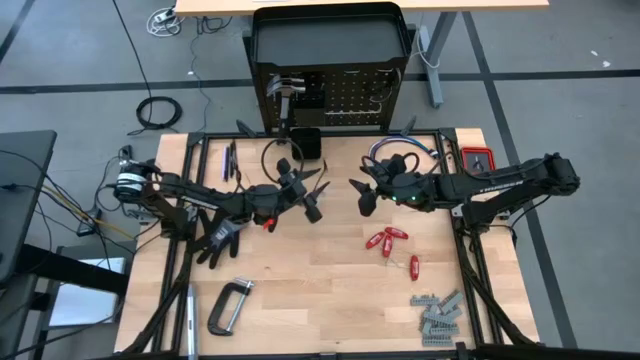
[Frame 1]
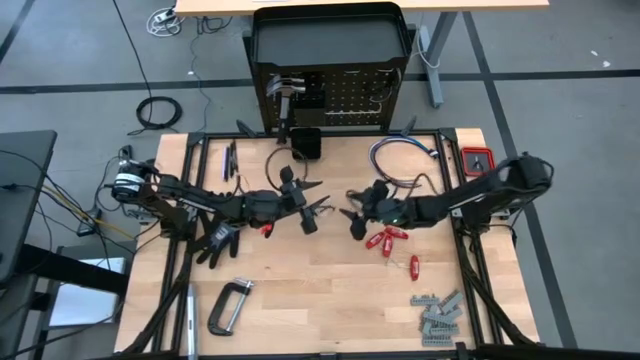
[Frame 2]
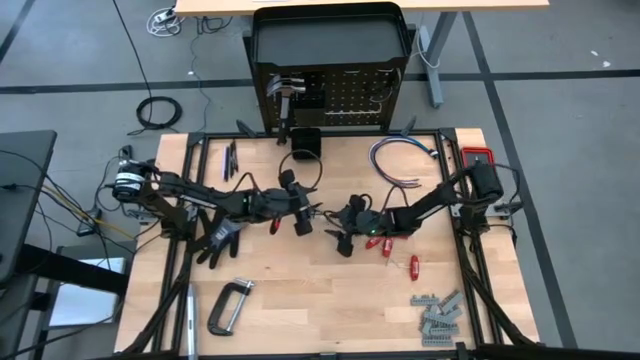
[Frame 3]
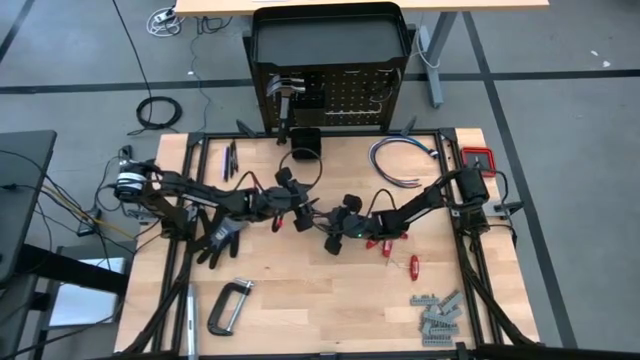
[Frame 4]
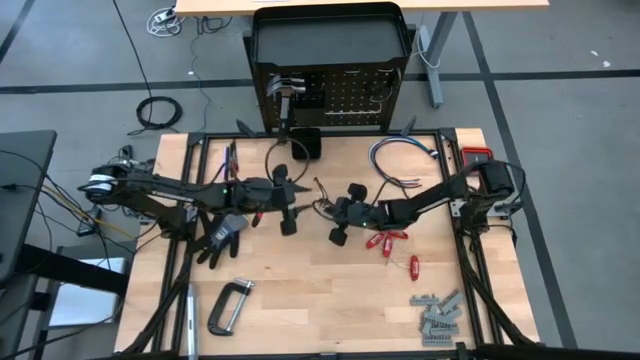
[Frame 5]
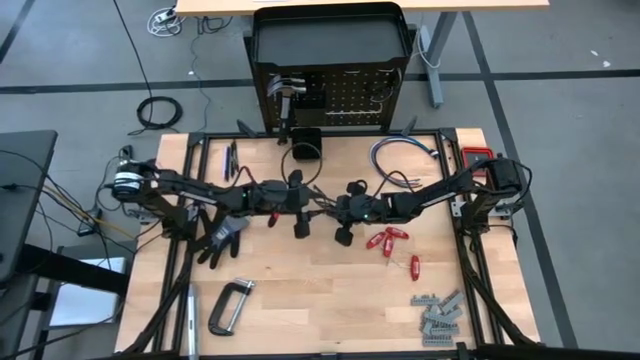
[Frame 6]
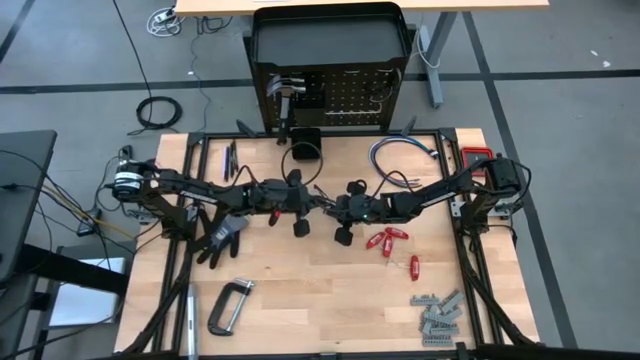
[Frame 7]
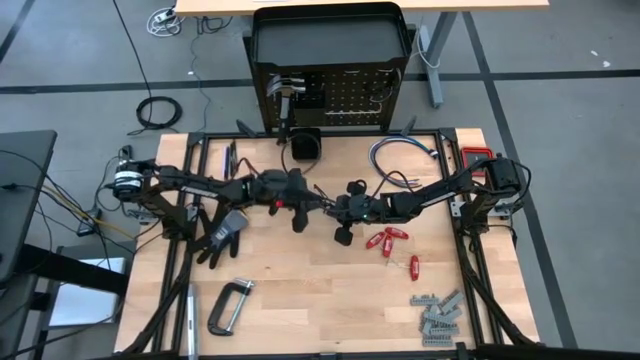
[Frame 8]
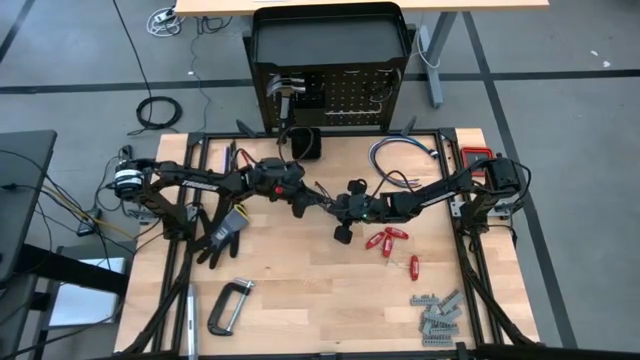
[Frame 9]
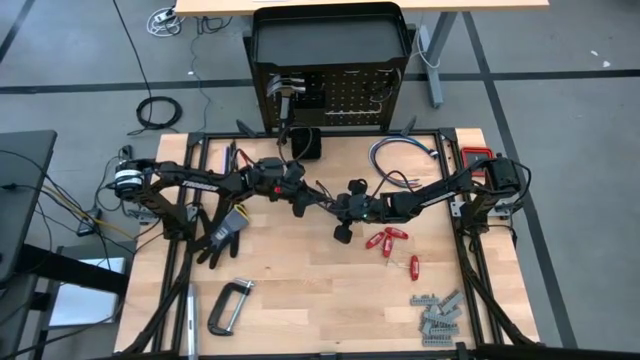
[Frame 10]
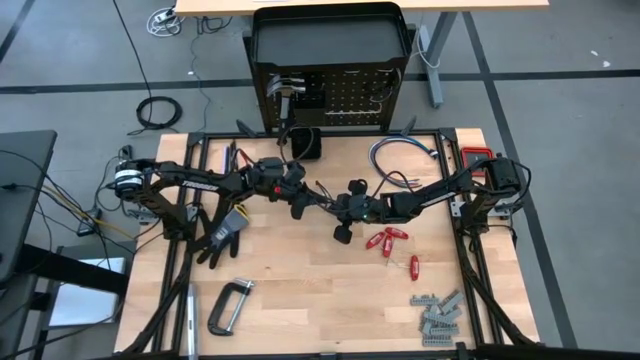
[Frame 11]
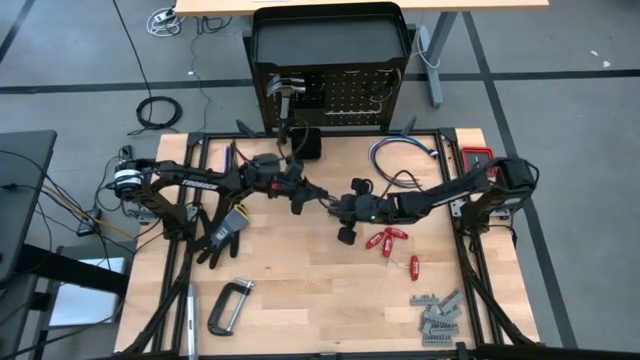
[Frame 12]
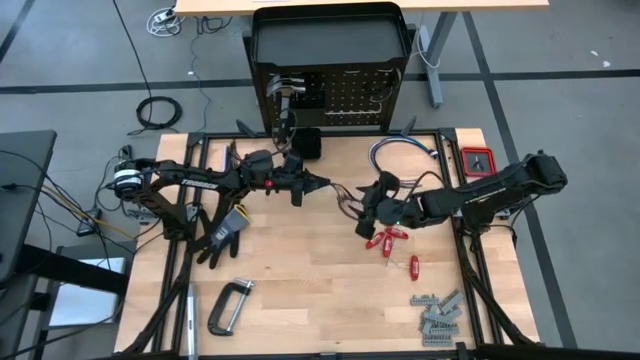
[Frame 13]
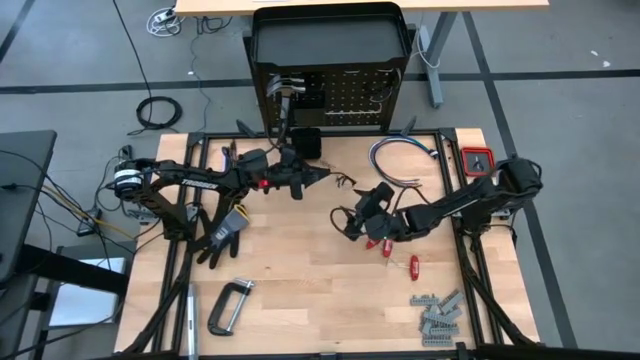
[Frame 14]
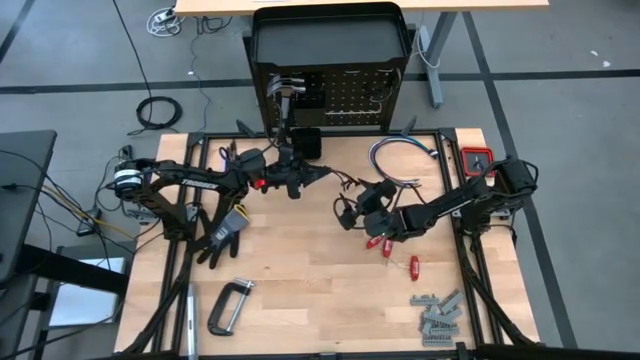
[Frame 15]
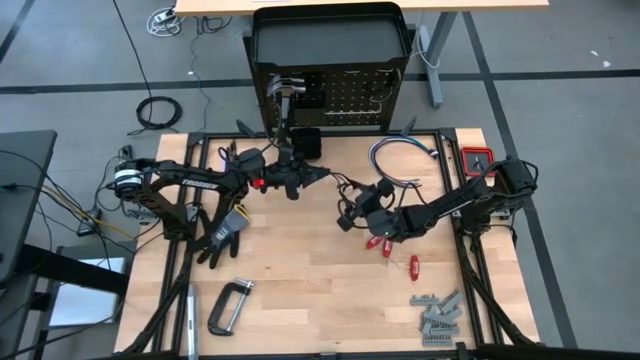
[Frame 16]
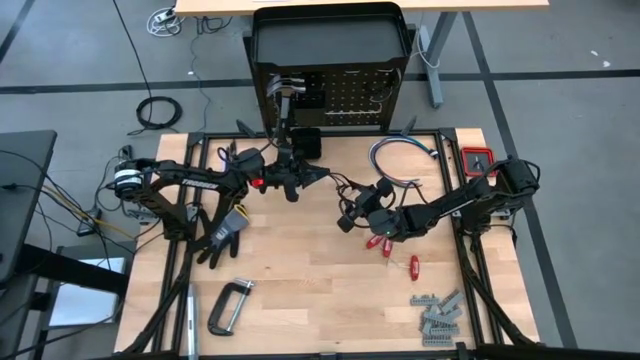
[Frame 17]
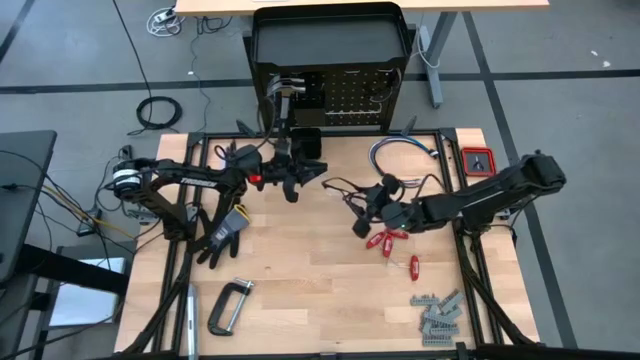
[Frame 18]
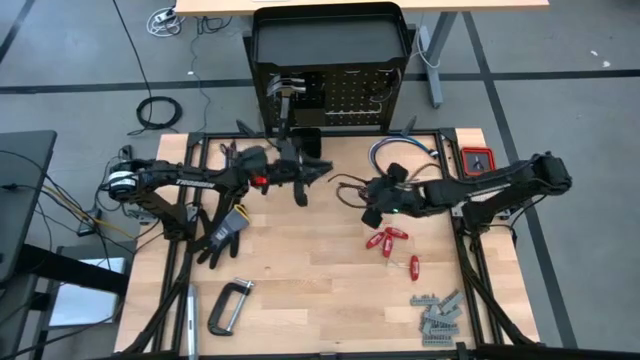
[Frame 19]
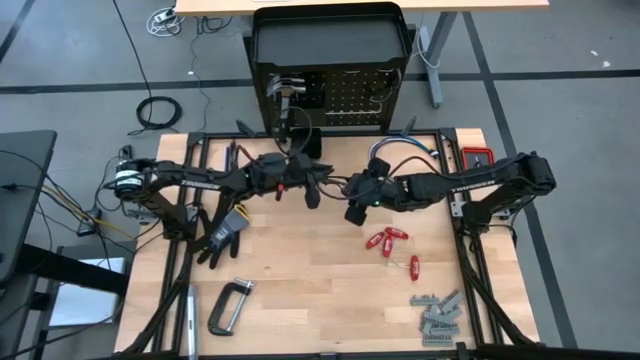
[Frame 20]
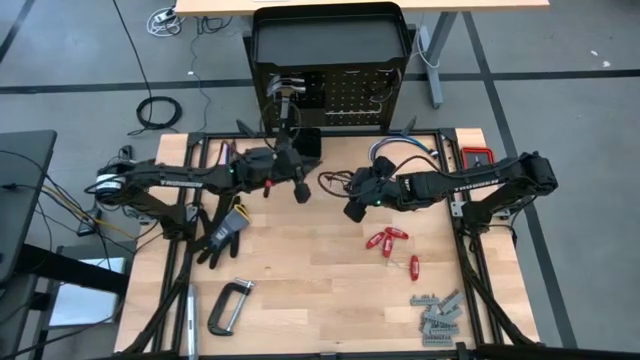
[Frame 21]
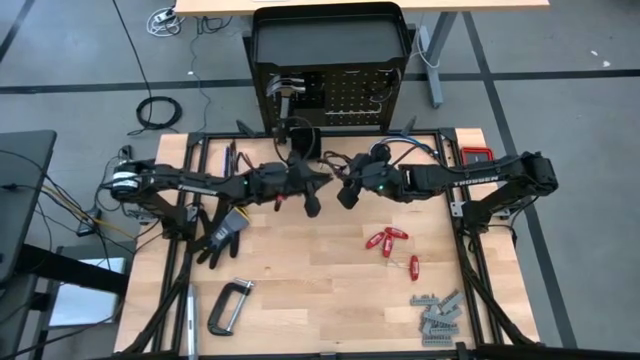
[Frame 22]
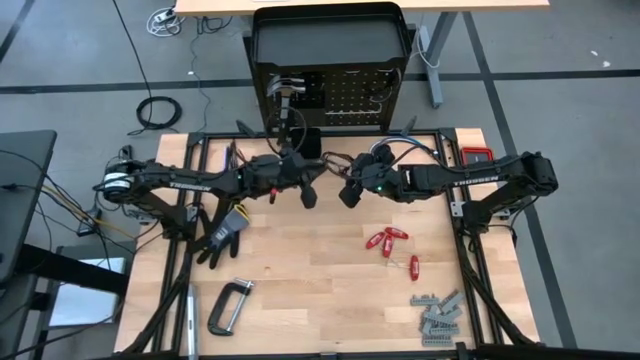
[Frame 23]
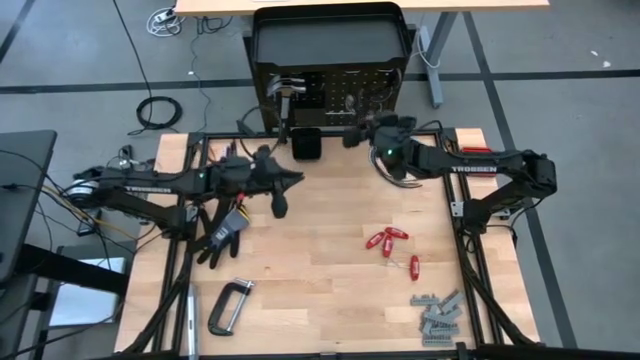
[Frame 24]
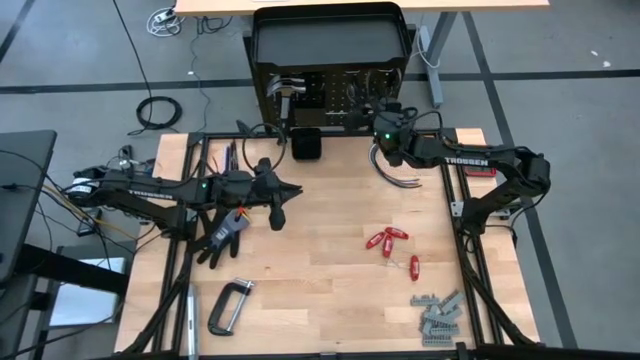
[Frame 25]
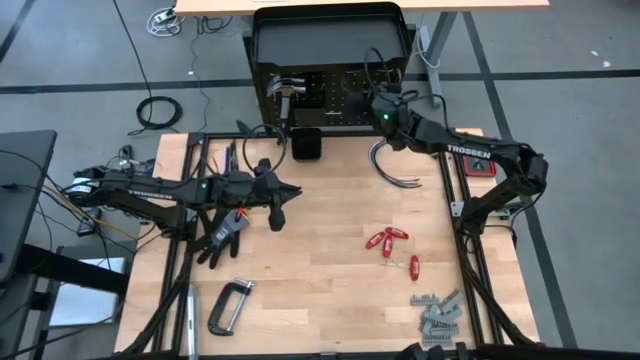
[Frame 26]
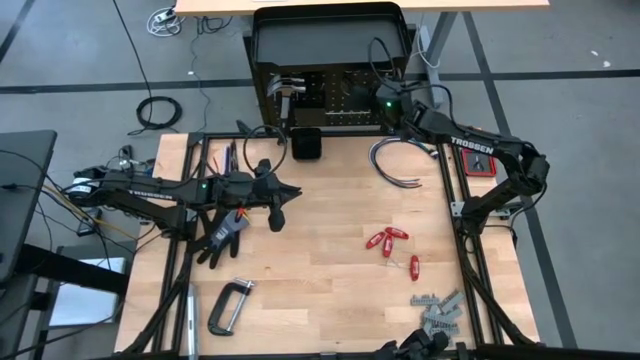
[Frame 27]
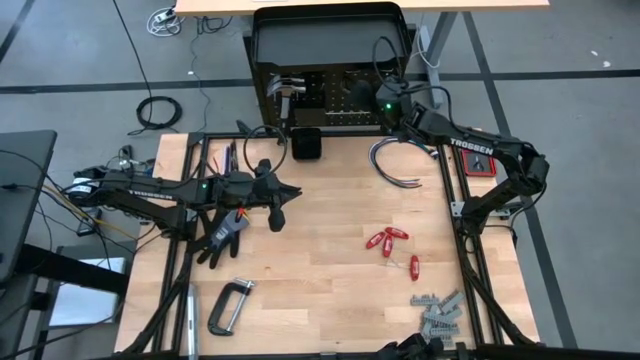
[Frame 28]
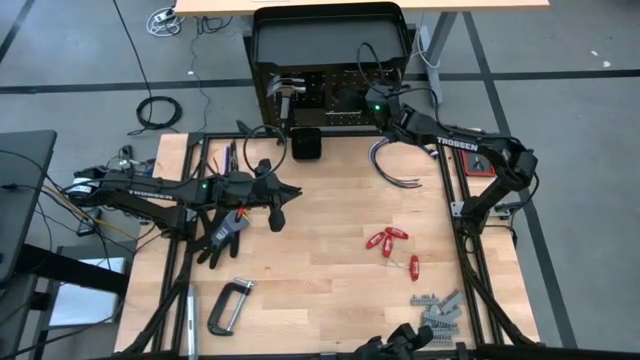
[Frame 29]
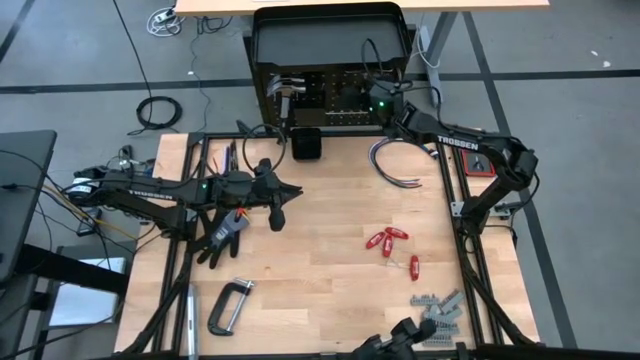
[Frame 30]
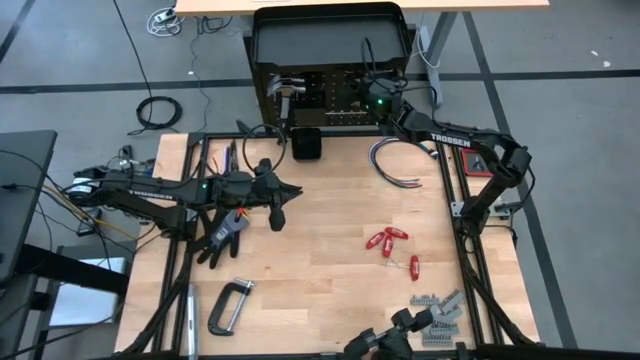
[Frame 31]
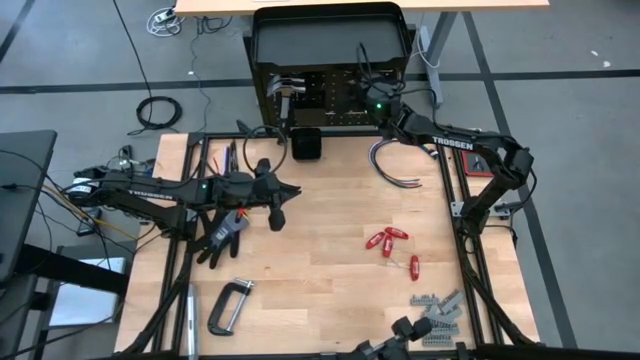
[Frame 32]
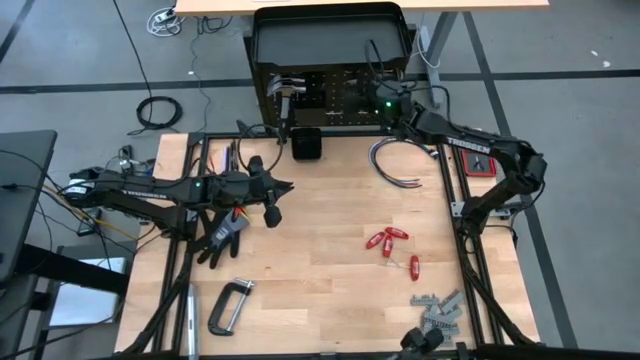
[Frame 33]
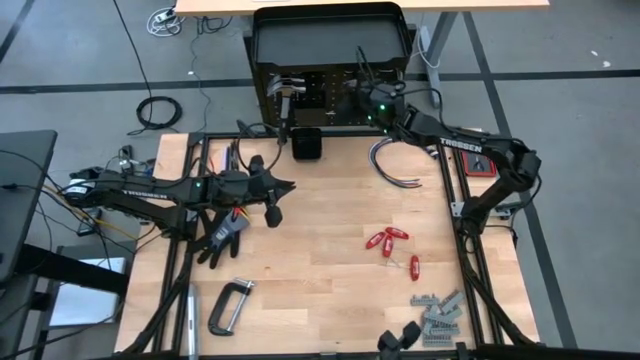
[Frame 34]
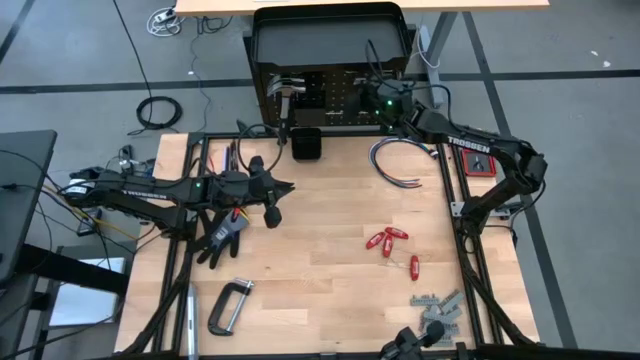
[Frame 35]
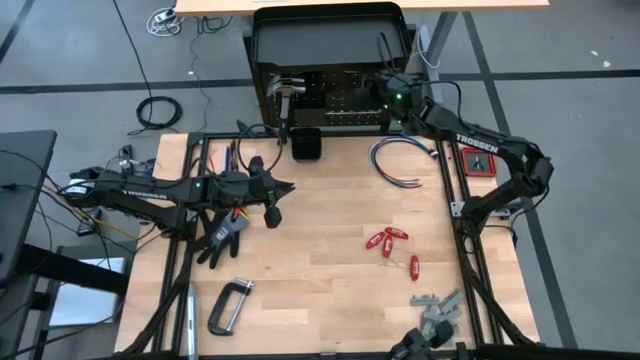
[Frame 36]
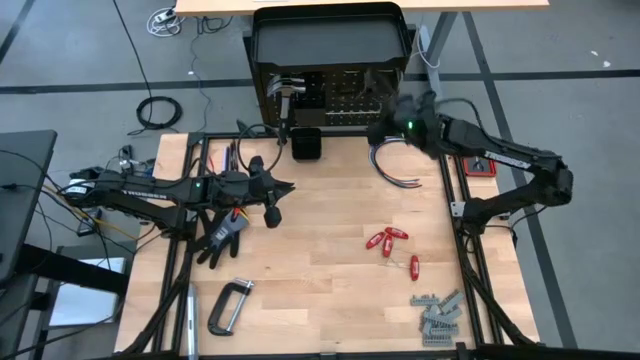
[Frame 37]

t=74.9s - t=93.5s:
Task: Hang tools onto peg board
Hang the safety goggles on the peg board
